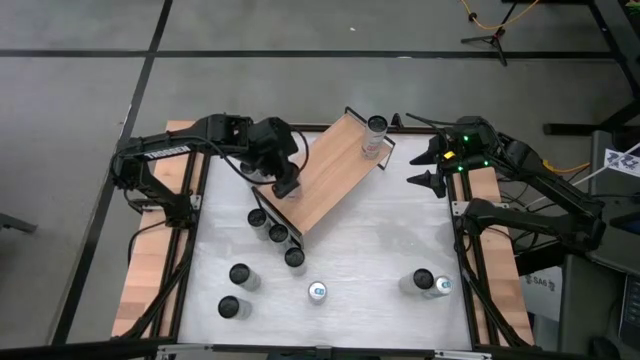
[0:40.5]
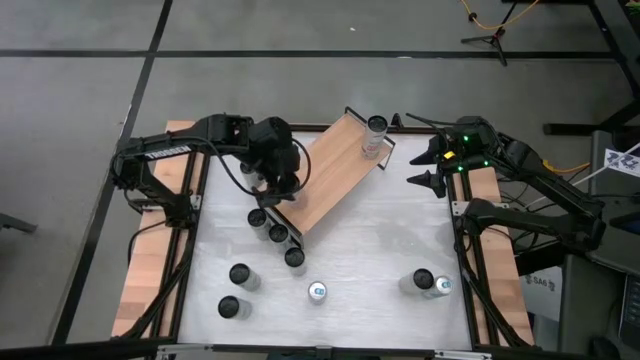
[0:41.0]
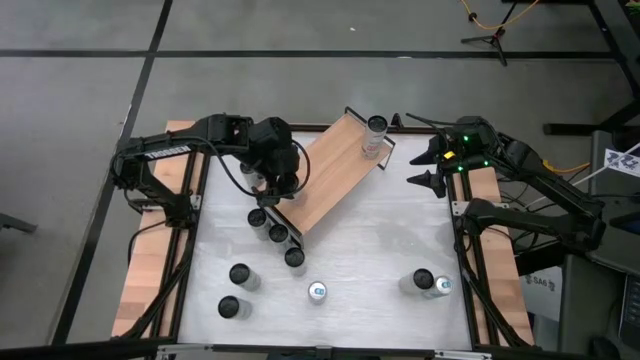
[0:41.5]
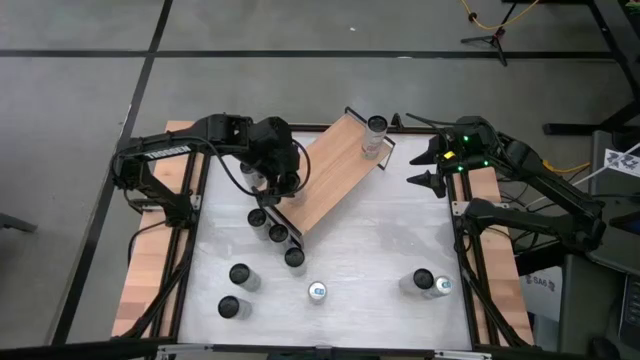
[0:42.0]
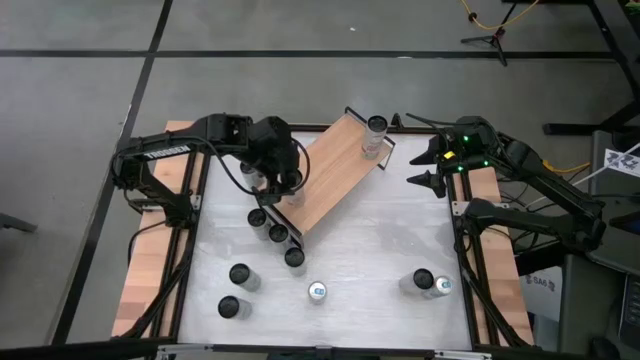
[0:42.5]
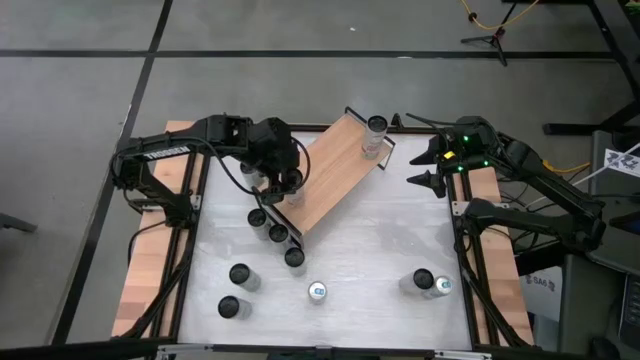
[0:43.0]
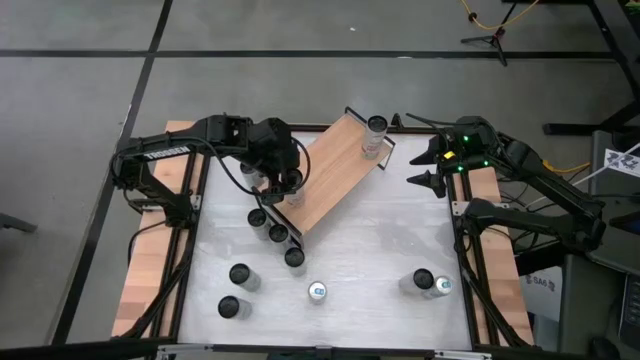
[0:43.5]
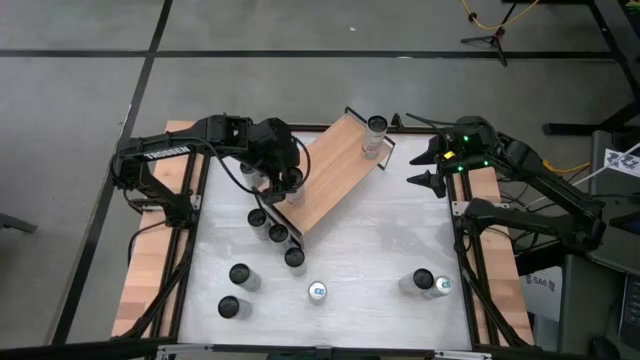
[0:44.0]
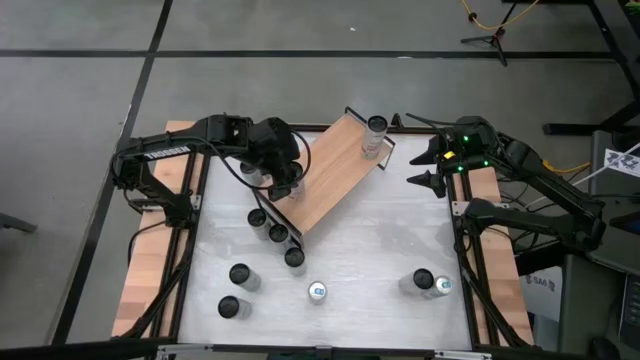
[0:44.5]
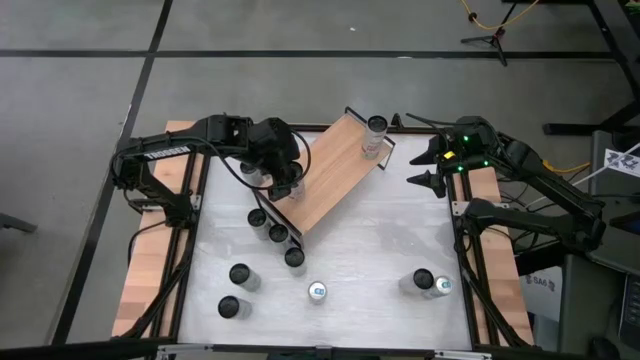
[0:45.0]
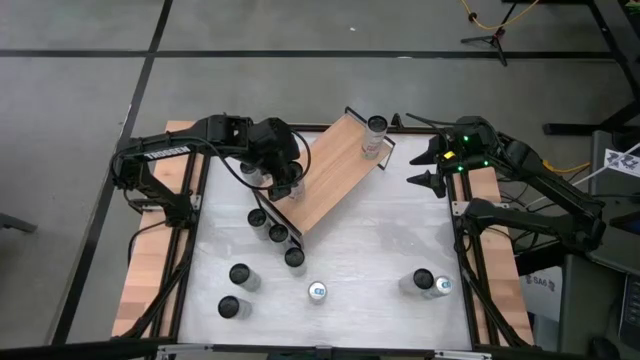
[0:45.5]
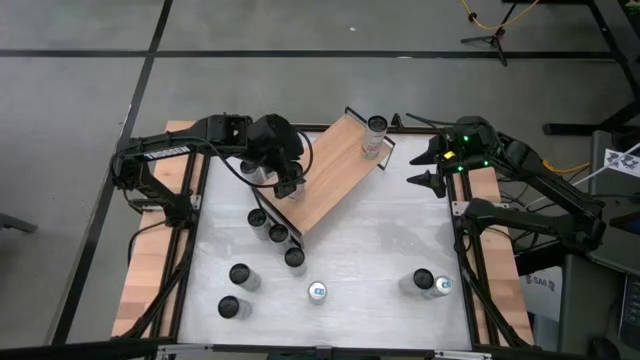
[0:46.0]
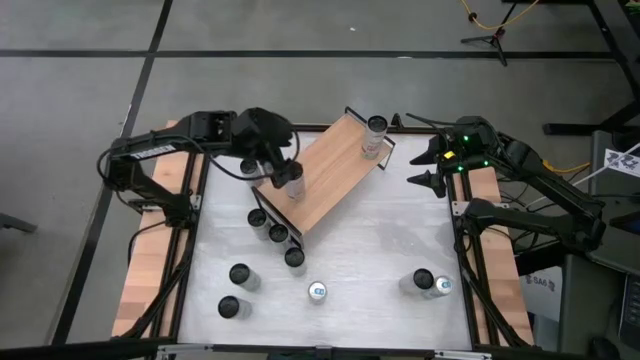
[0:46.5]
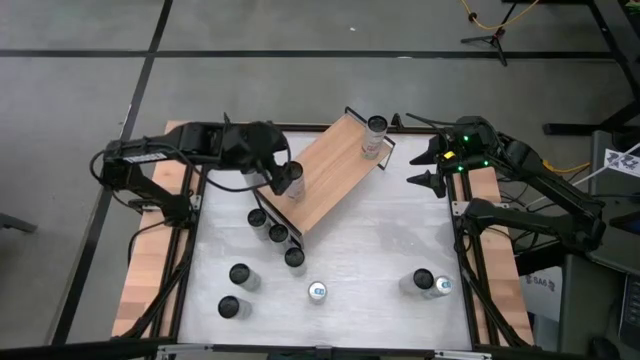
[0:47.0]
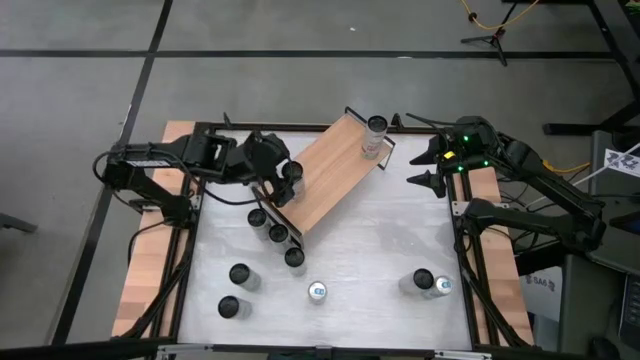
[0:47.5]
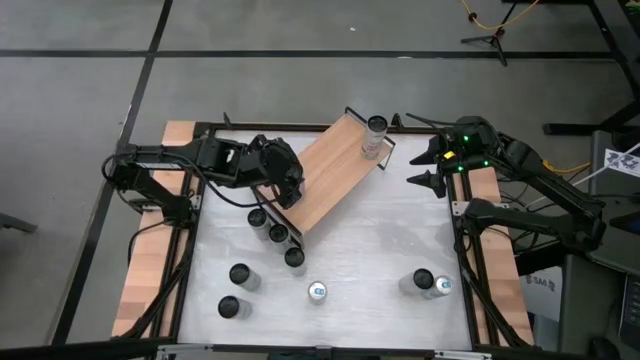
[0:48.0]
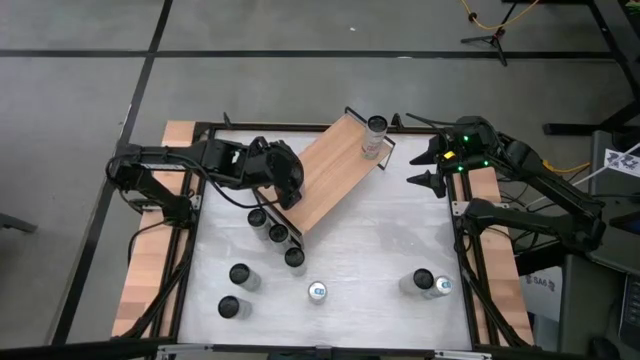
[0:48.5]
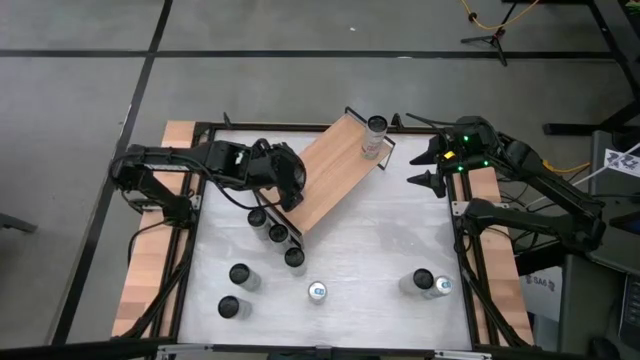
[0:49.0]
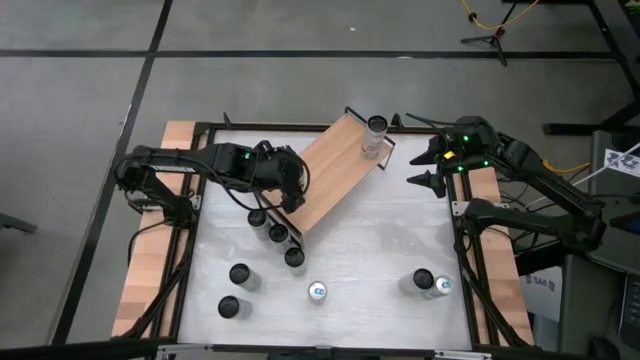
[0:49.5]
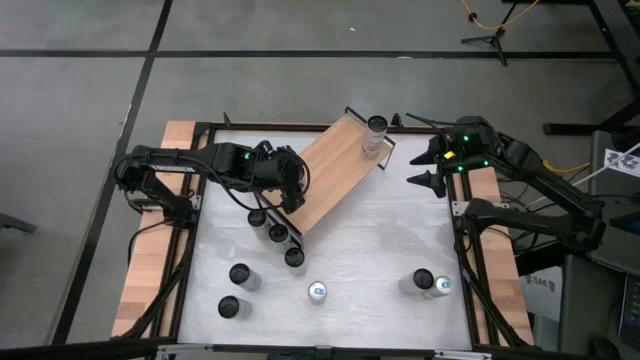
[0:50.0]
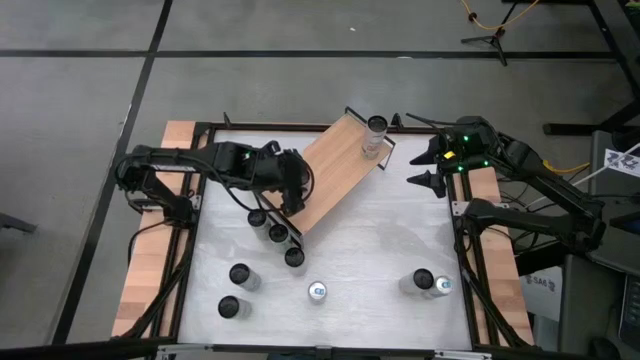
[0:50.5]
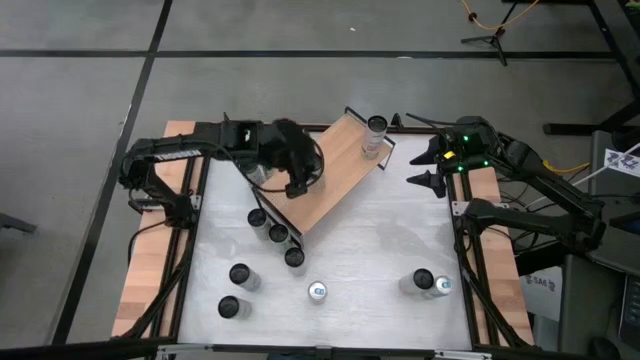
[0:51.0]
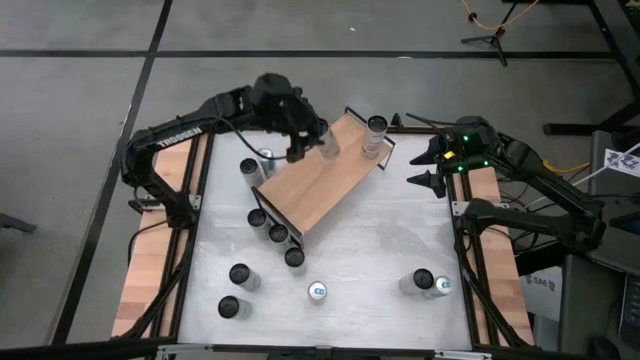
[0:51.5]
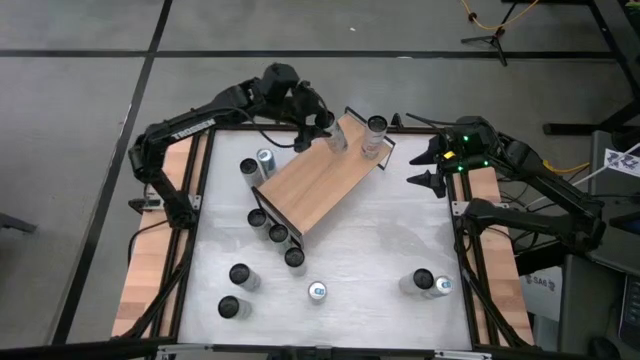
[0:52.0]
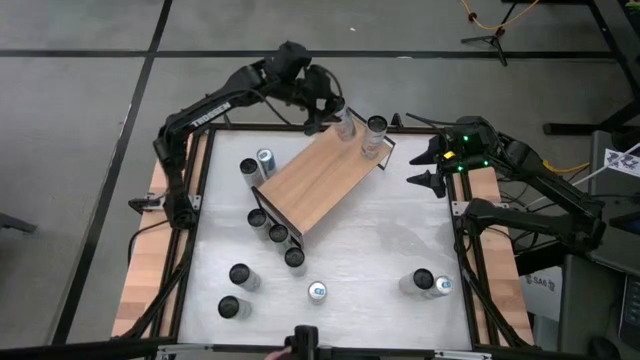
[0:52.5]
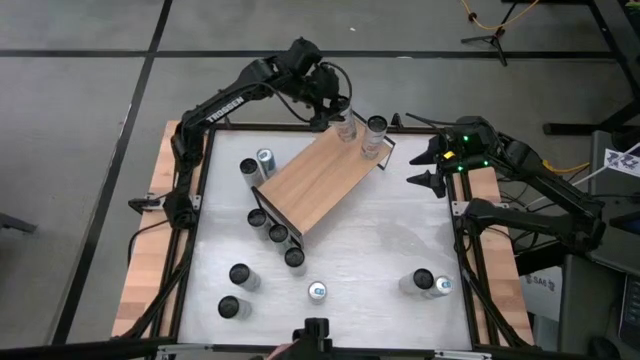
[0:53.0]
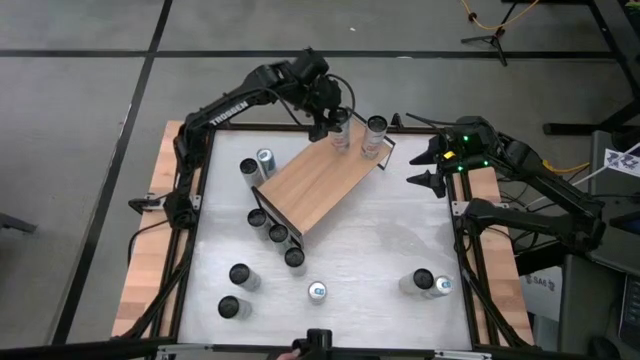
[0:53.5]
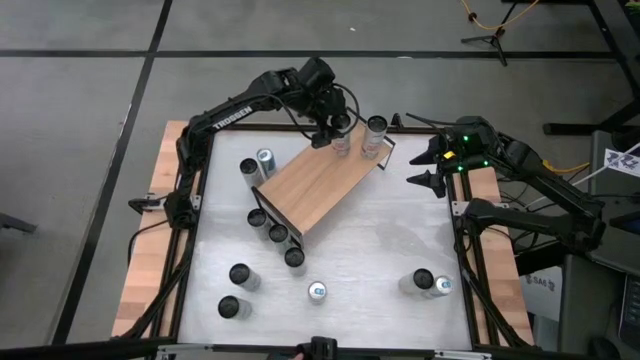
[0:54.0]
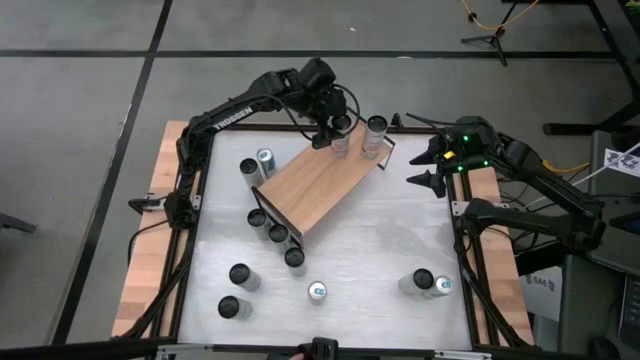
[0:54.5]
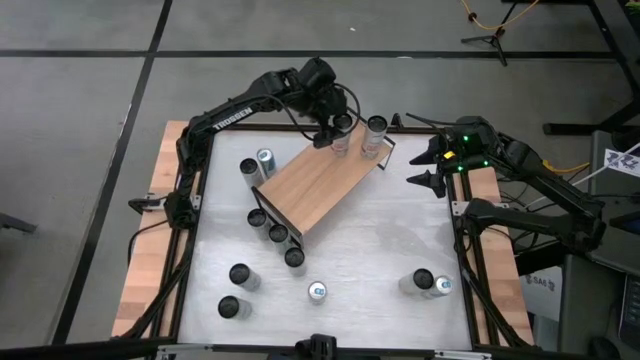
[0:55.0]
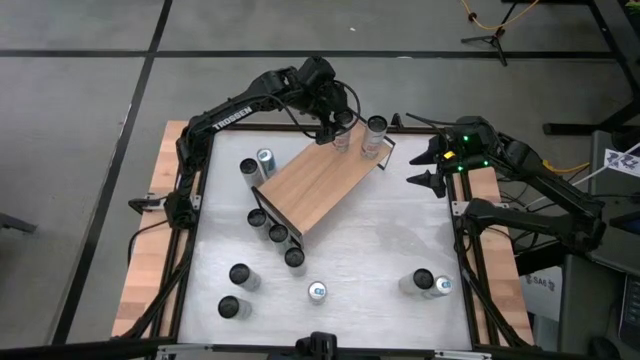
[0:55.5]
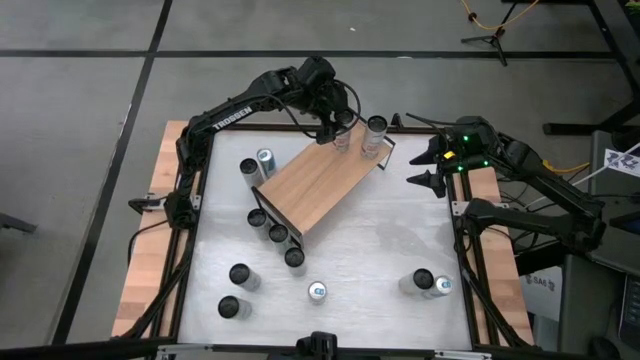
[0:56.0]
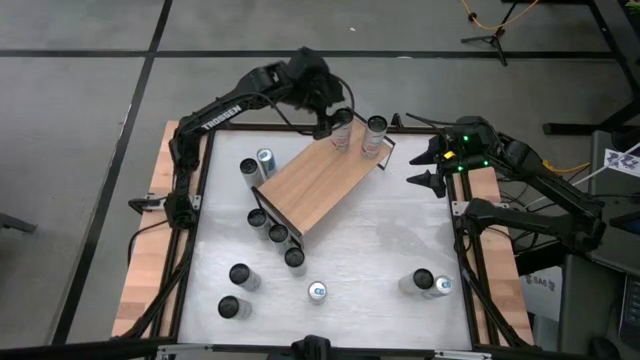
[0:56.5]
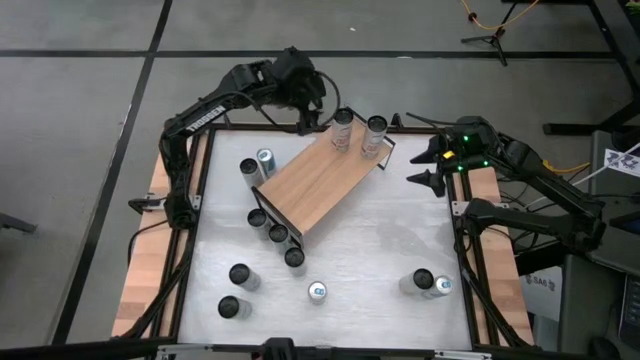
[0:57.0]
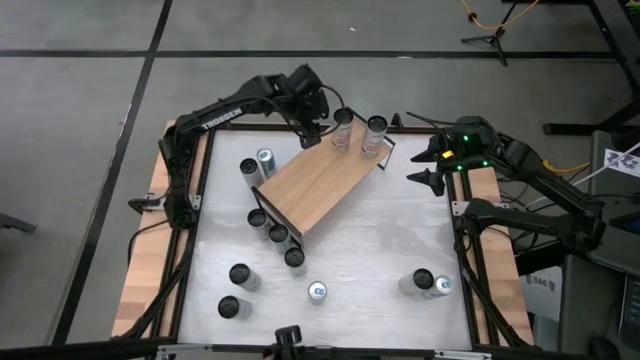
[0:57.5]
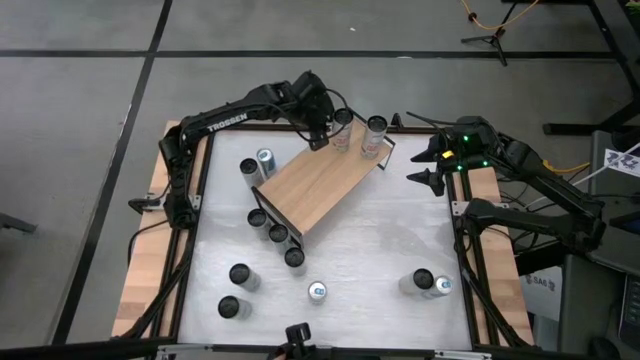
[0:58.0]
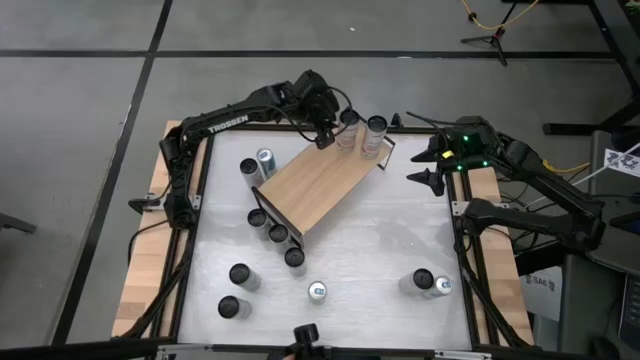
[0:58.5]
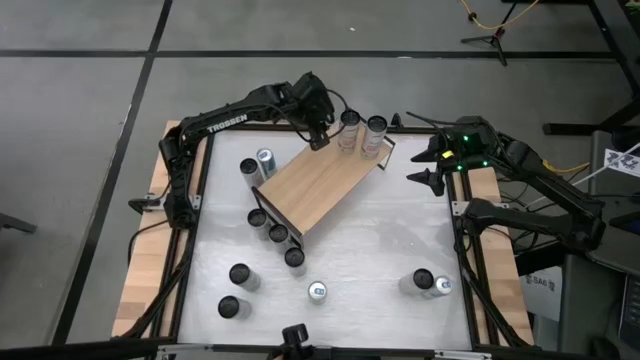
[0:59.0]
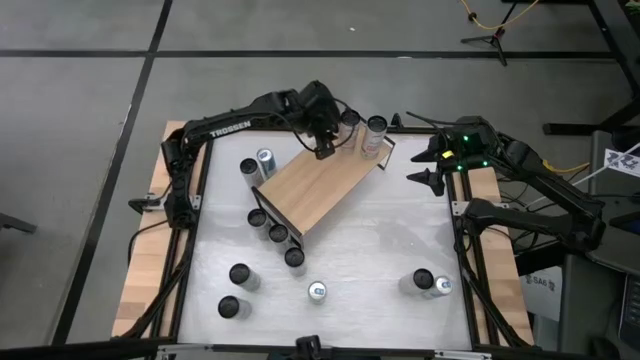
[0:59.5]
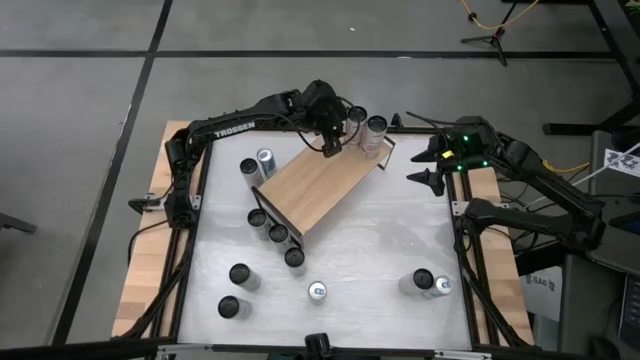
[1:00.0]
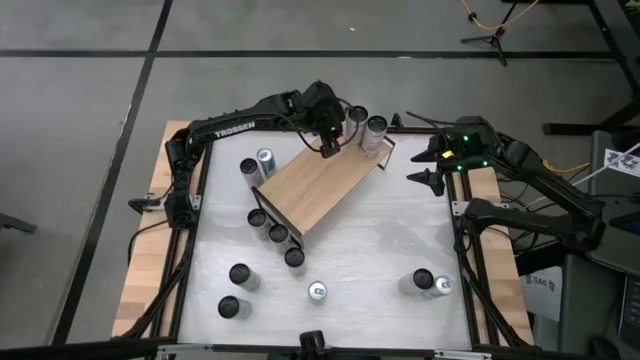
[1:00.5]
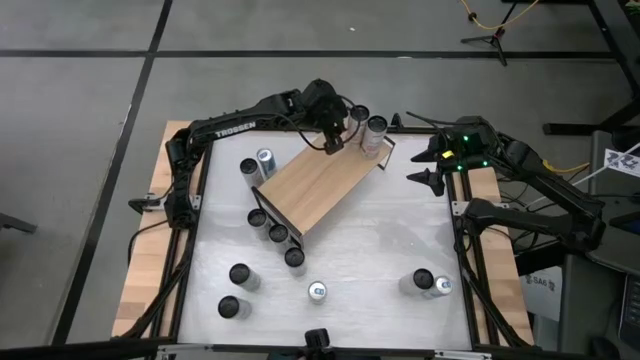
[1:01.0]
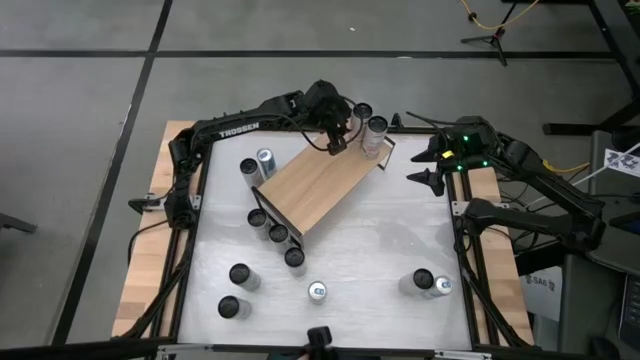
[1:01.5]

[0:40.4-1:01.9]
Task: Place canned beverage on shelf
Put the white-pink soda can on the shelf aligned with the other white-pink soda can
